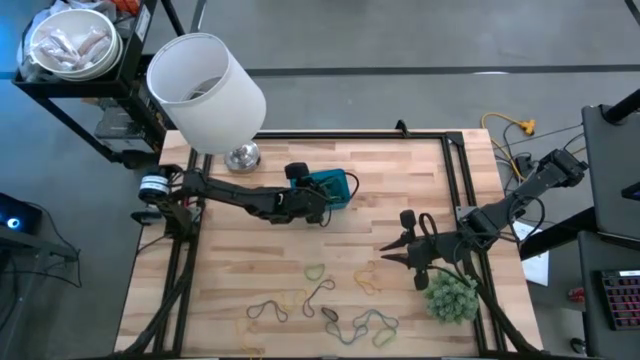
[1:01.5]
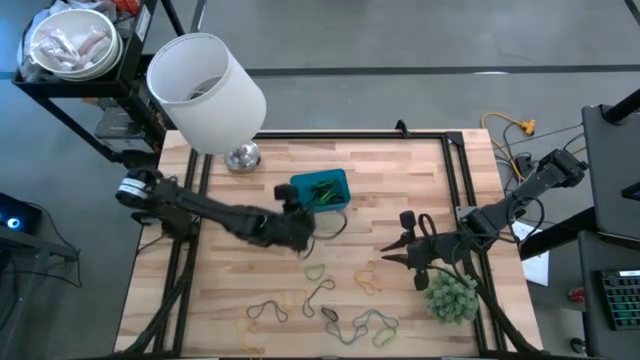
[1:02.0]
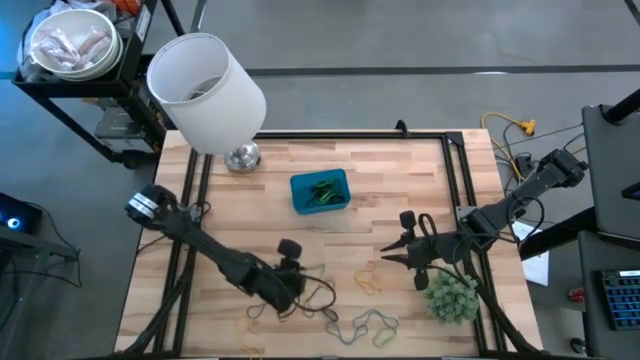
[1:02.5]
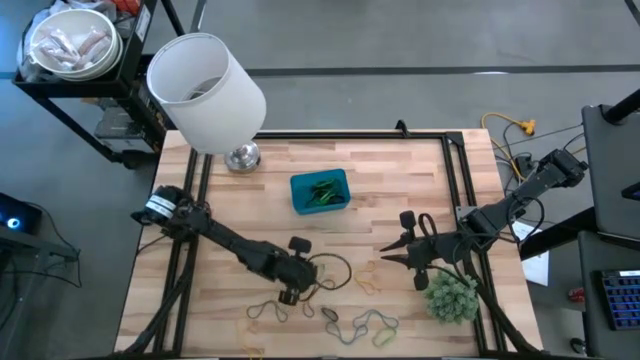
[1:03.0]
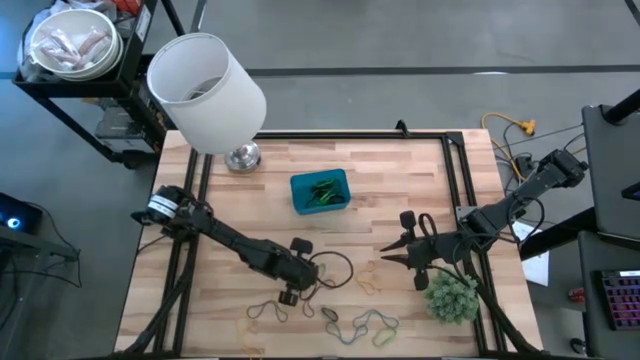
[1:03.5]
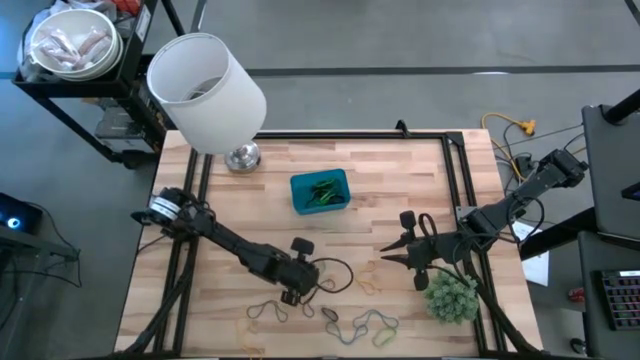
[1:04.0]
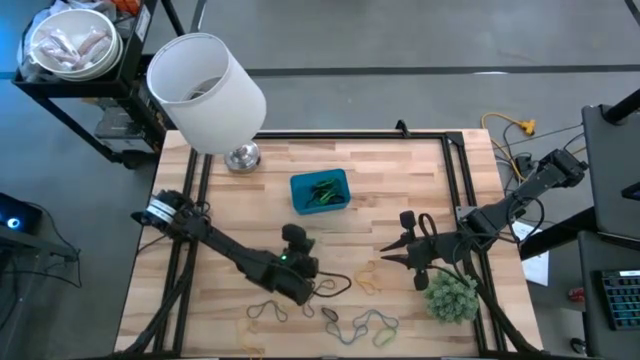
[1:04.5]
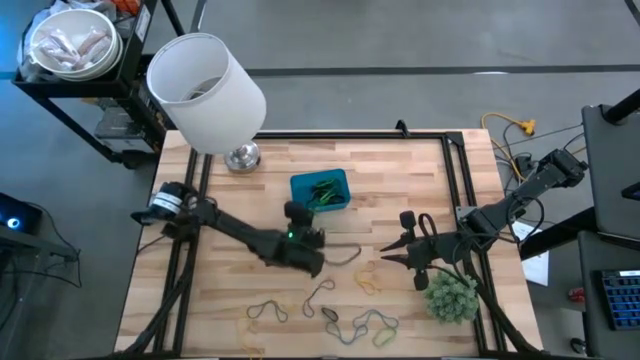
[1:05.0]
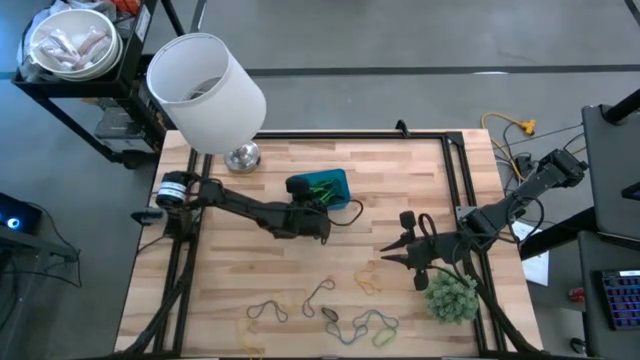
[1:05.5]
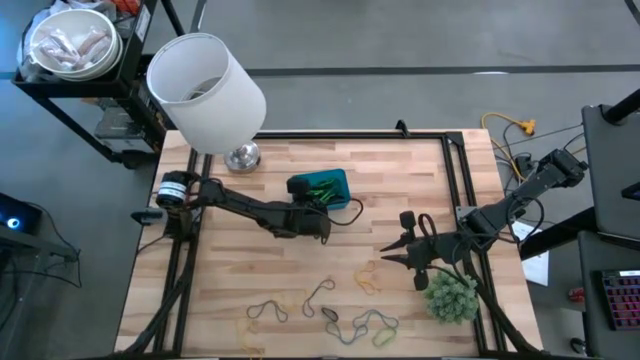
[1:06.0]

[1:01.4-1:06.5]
Task: Pick and place rubber bands into bin
Put the green rubber band into the blue bin

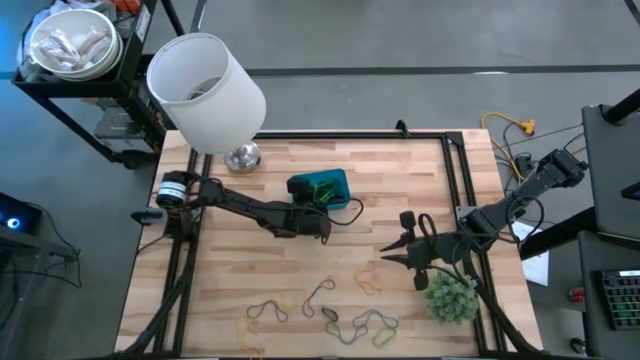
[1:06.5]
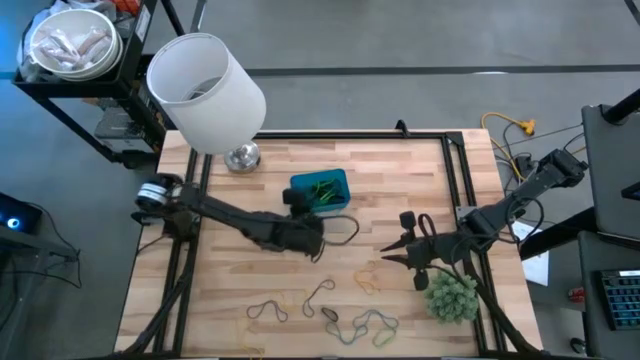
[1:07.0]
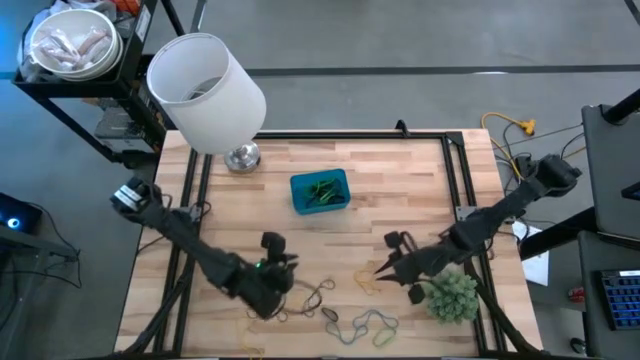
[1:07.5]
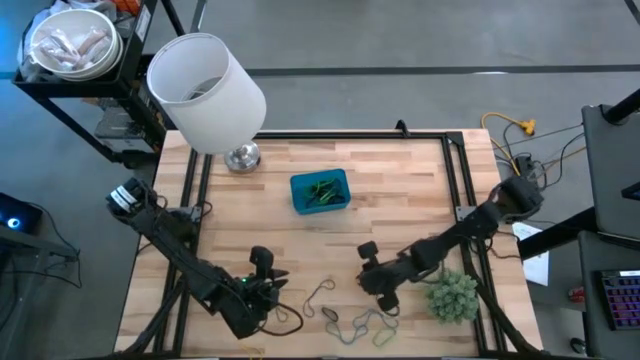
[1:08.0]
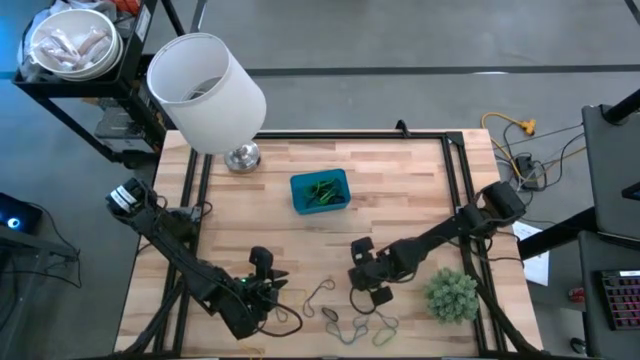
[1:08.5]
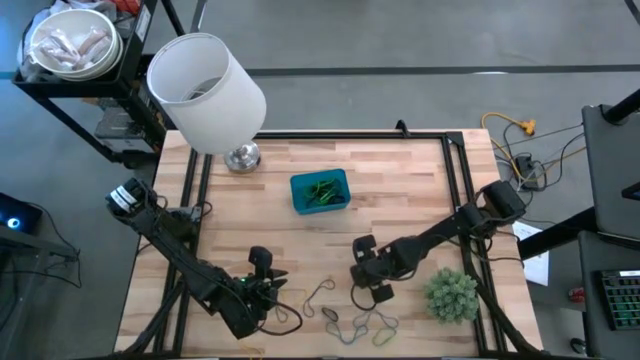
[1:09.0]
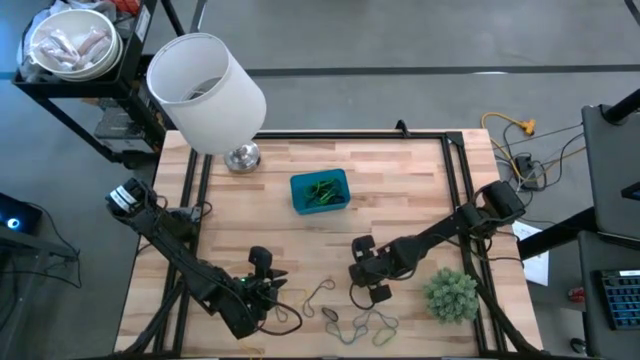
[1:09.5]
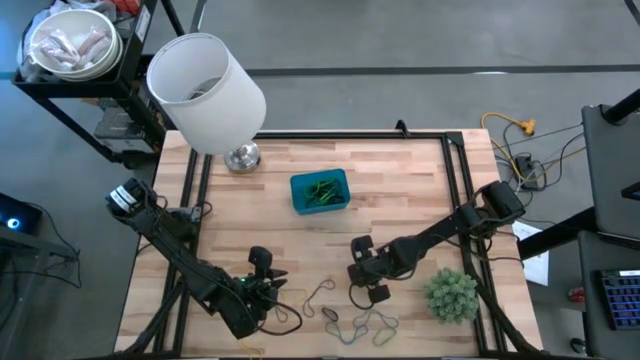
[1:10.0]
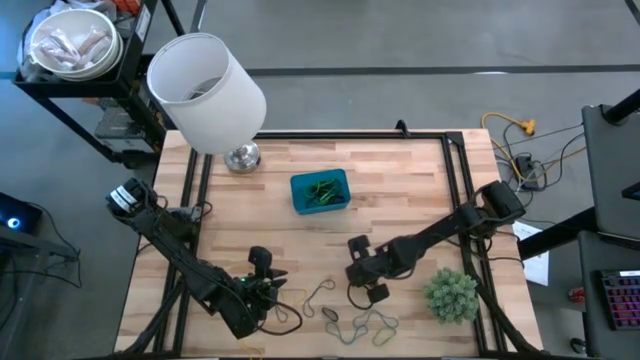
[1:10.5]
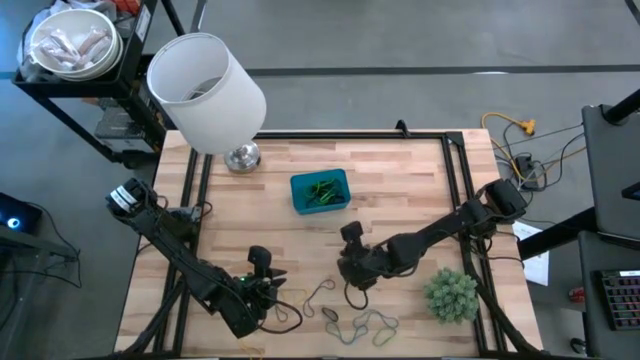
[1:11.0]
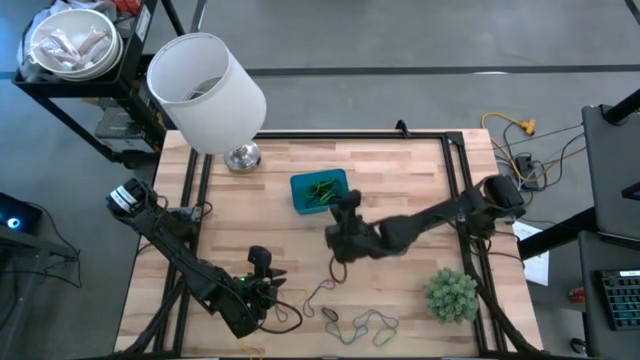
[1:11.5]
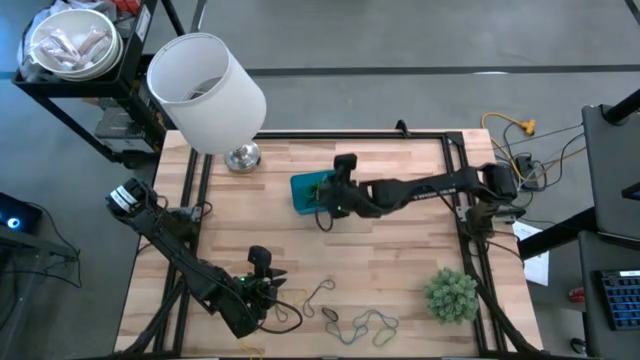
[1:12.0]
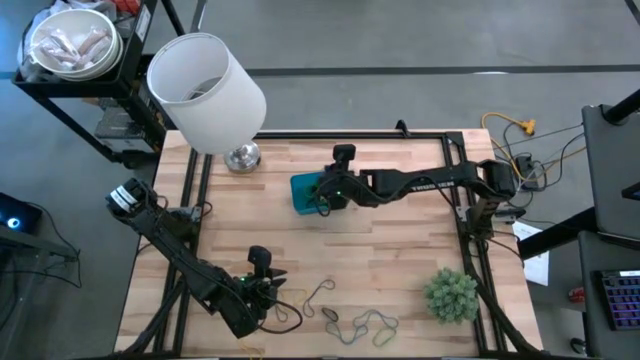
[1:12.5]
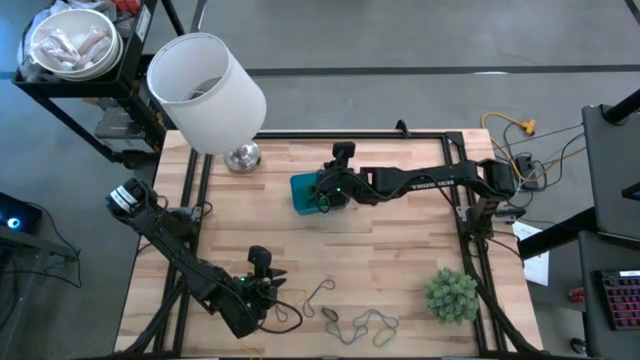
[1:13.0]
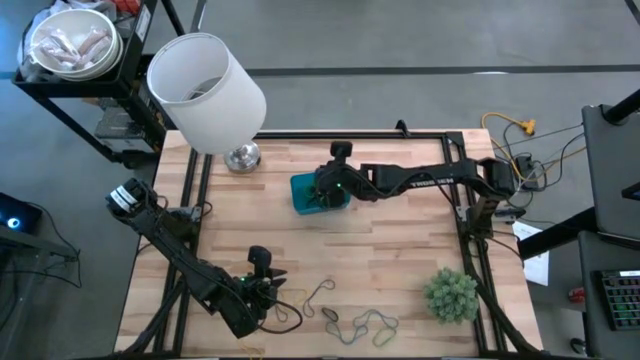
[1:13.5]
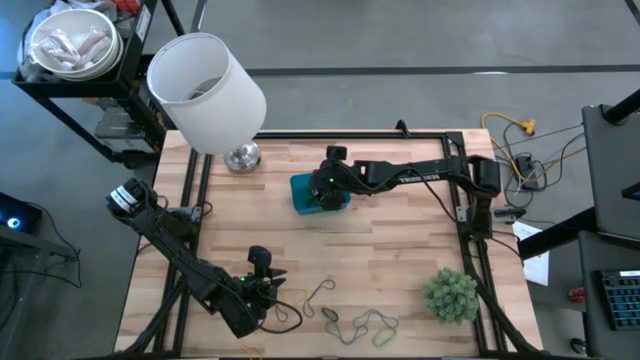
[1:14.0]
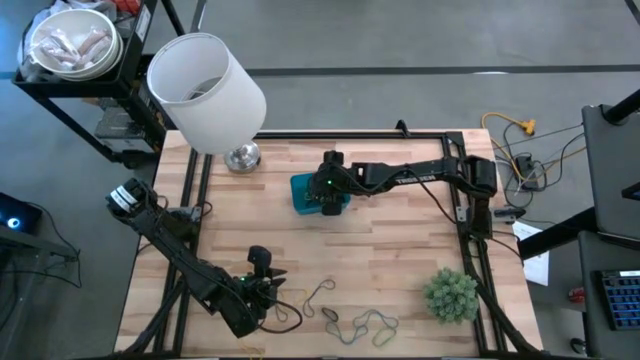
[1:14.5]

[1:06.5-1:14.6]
Put the yellow rubber band into the blue bin

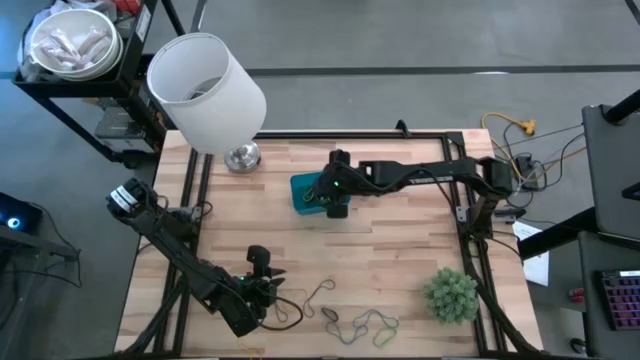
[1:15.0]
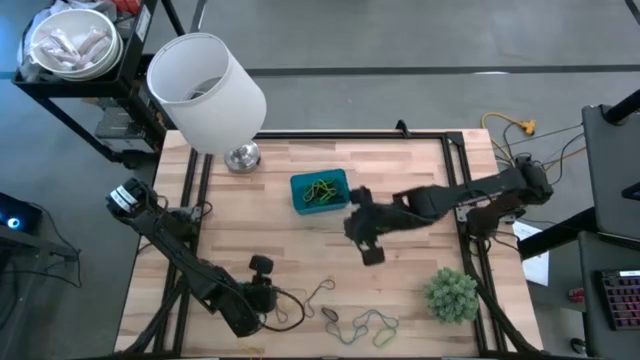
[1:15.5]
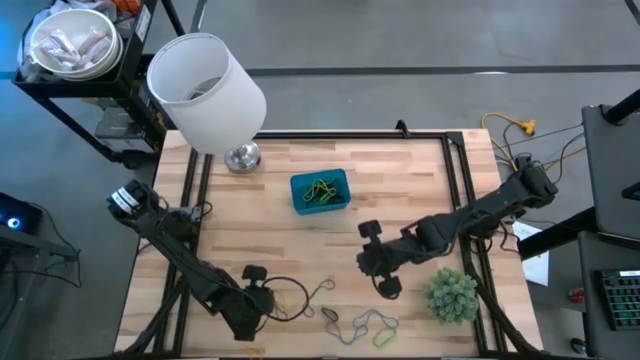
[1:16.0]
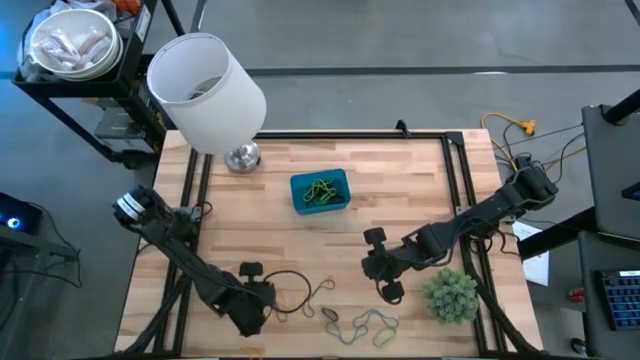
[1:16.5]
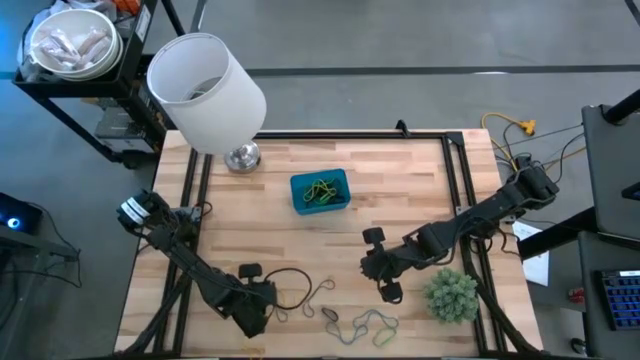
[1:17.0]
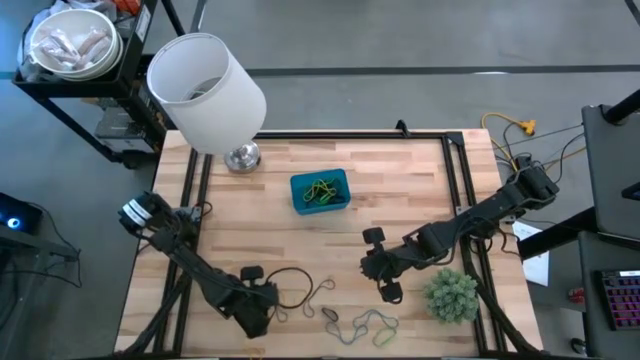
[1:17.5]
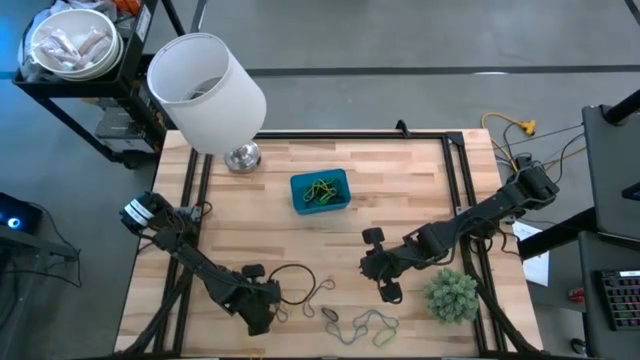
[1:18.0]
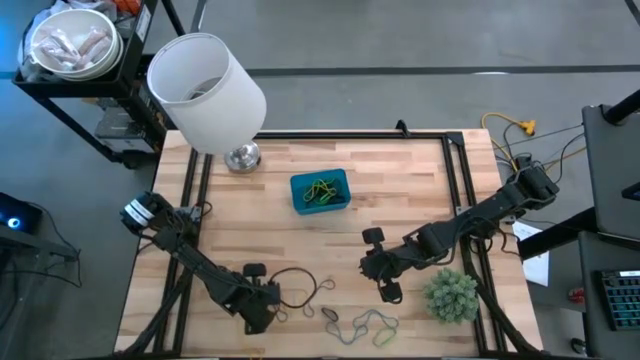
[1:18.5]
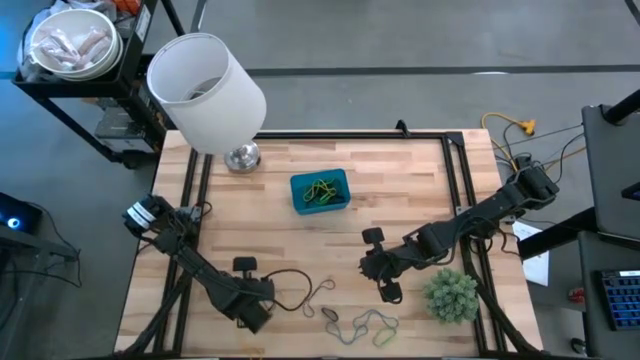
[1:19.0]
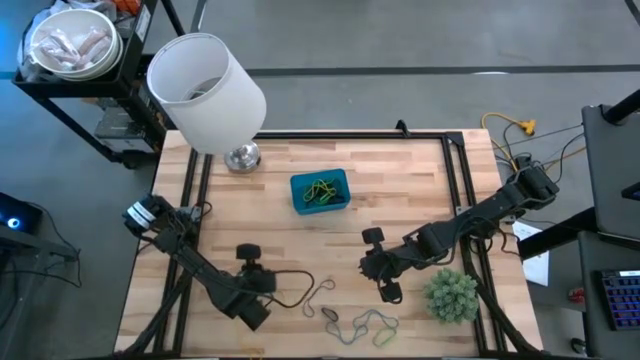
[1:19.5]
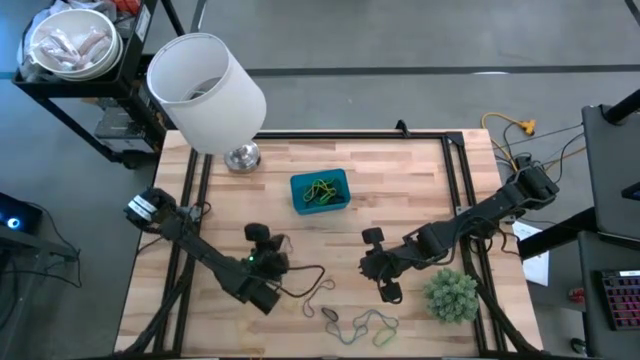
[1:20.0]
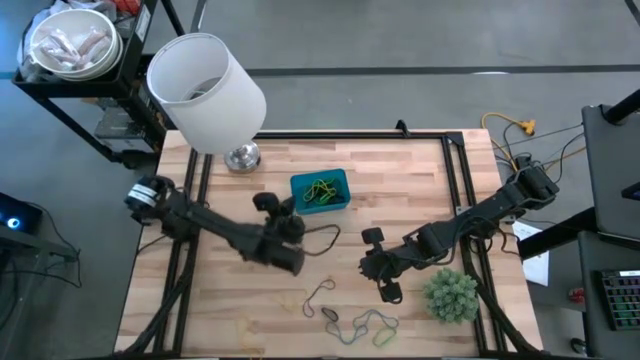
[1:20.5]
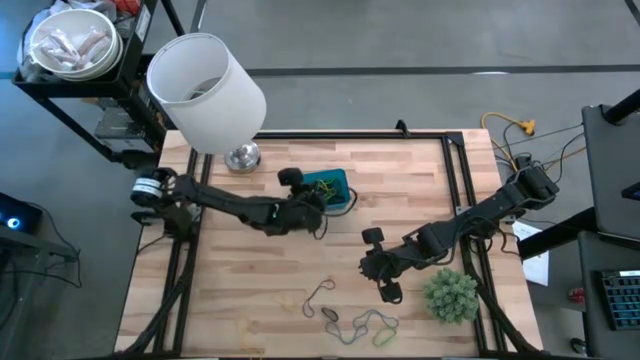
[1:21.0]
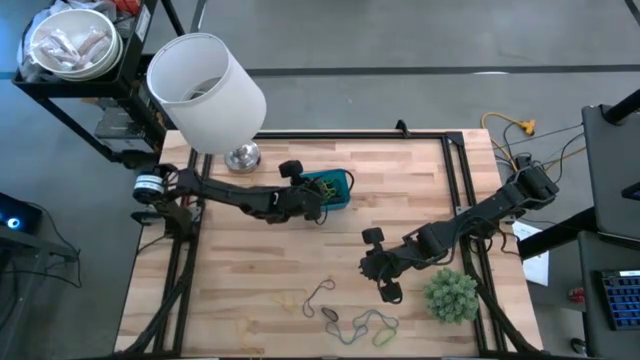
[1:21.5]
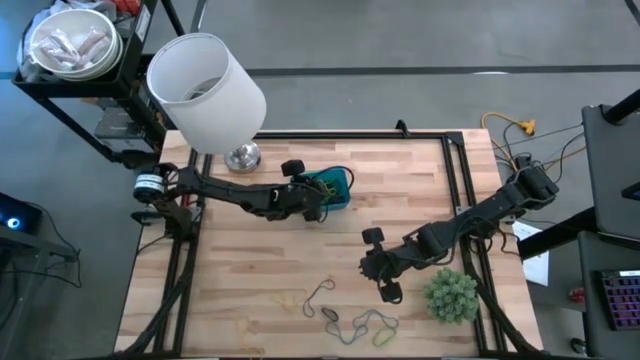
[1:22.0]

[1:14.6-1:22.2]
Put the purple rubber band into the blue bin

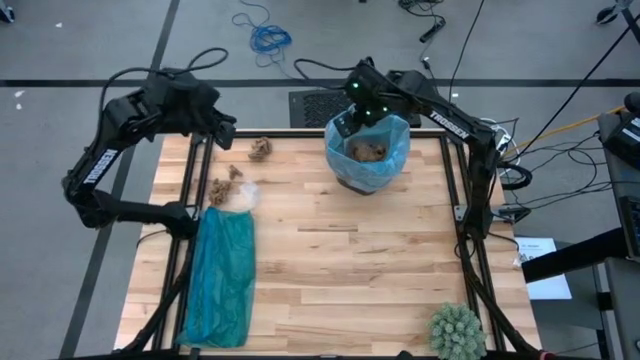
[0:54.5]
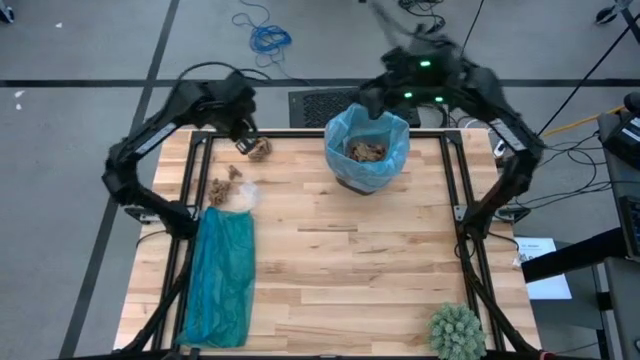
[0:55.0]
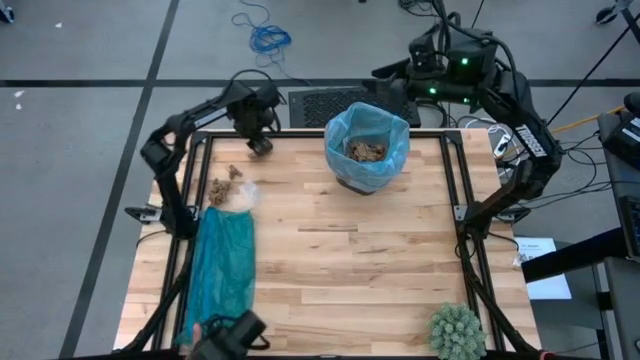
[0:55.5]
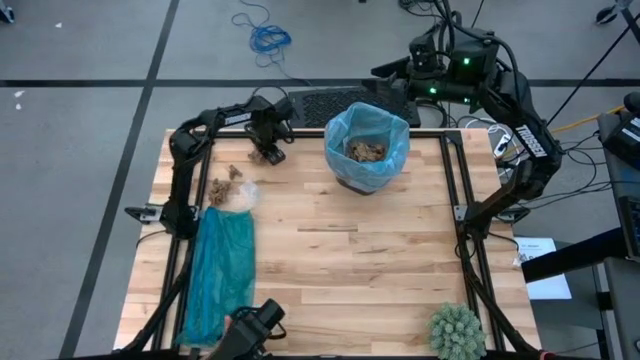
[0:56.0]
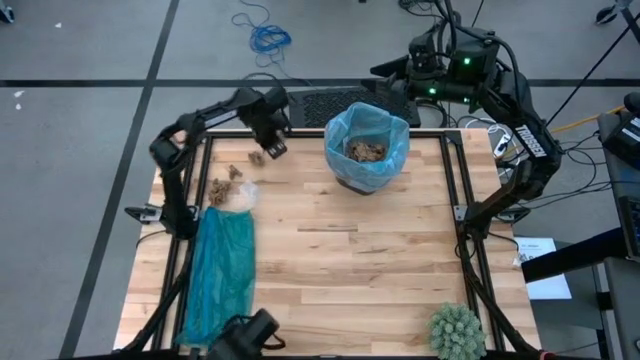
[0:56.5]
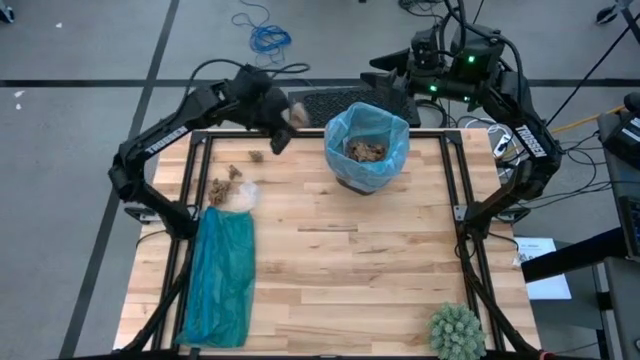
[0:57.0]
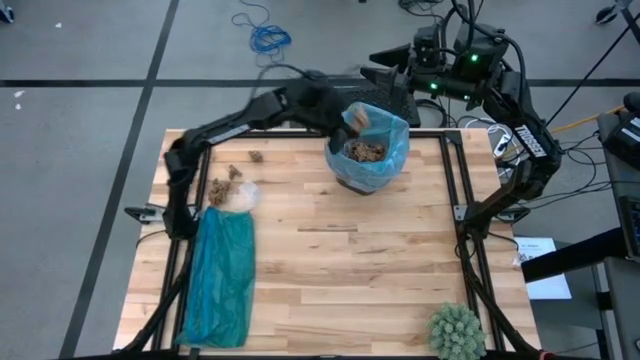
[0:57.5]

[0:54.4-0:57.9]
Task: place trash/remove bag and relplace
Put the brown napkin into the trash bin
